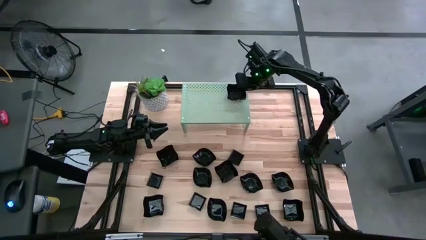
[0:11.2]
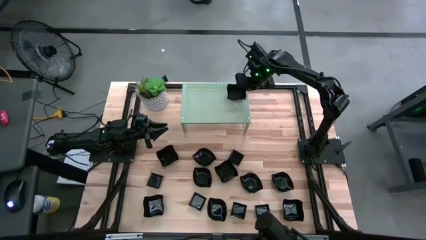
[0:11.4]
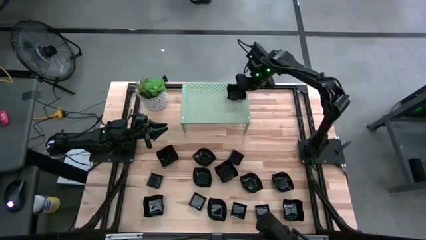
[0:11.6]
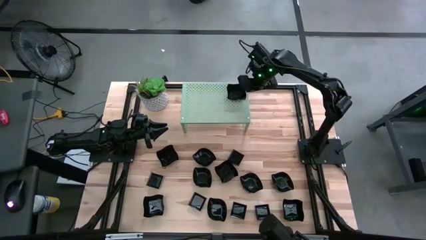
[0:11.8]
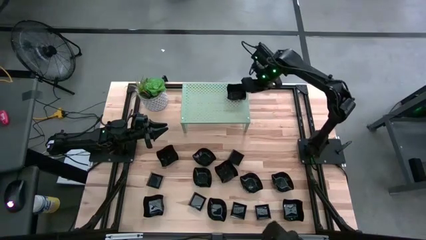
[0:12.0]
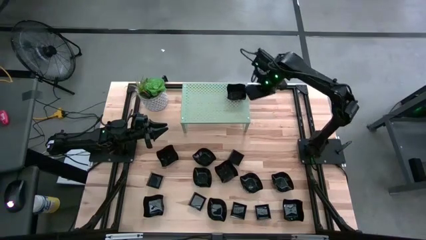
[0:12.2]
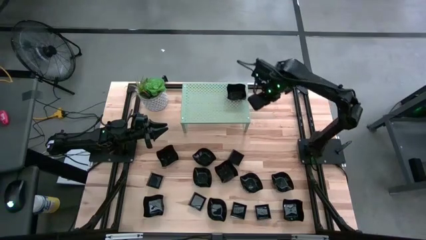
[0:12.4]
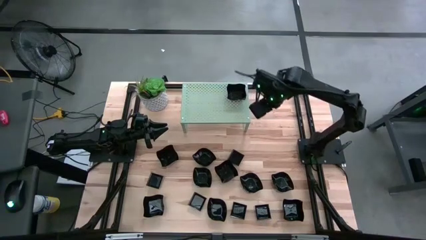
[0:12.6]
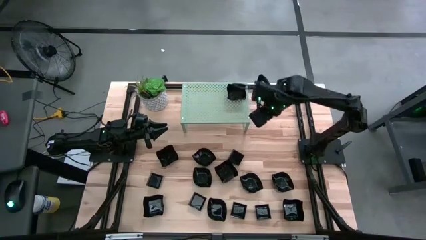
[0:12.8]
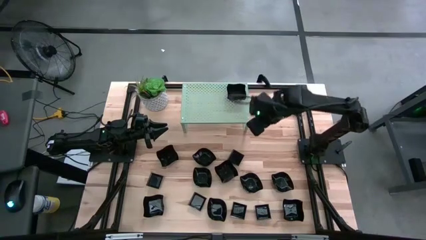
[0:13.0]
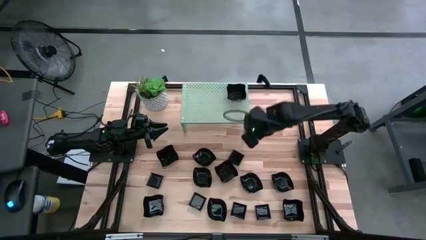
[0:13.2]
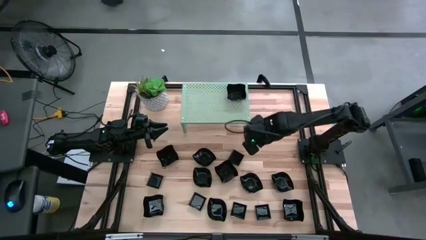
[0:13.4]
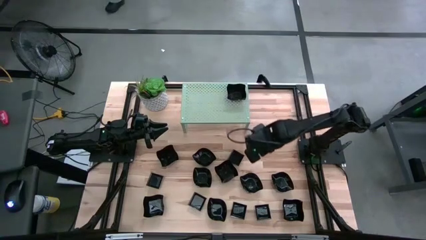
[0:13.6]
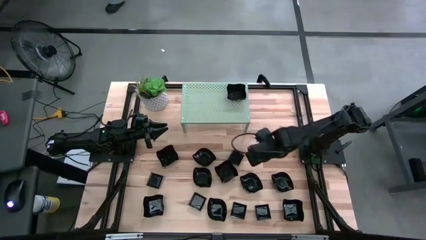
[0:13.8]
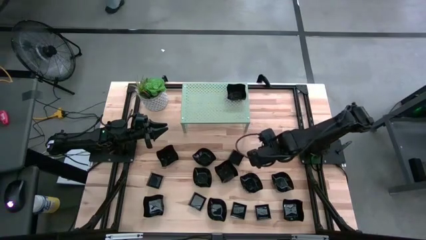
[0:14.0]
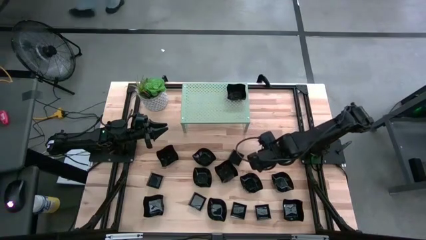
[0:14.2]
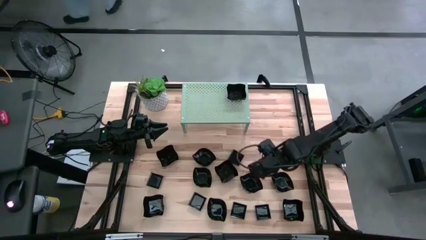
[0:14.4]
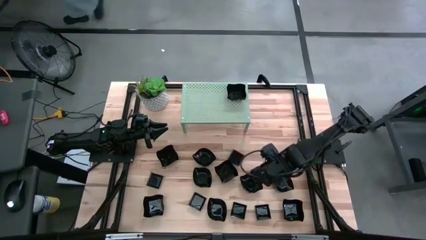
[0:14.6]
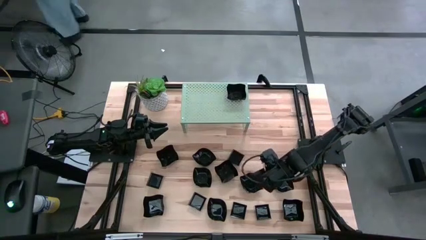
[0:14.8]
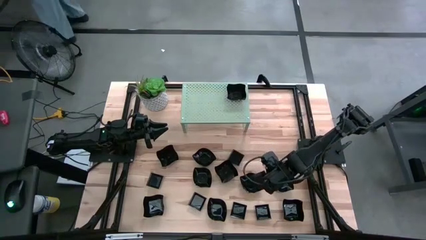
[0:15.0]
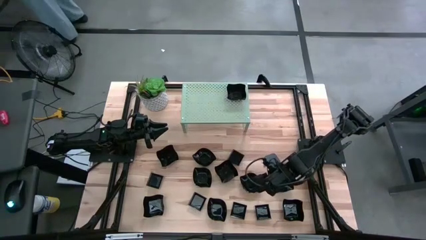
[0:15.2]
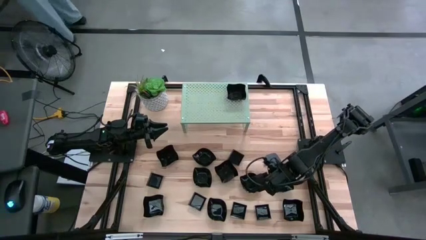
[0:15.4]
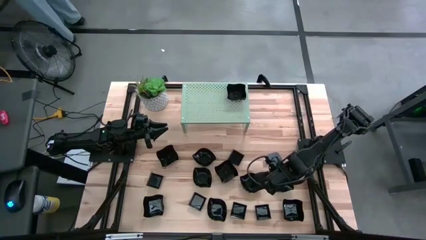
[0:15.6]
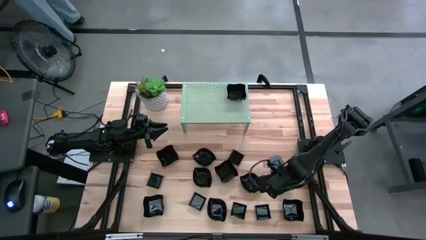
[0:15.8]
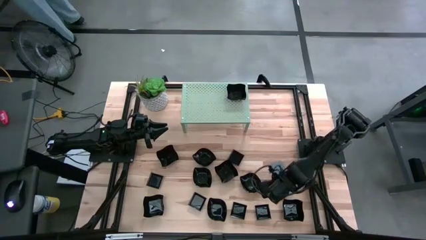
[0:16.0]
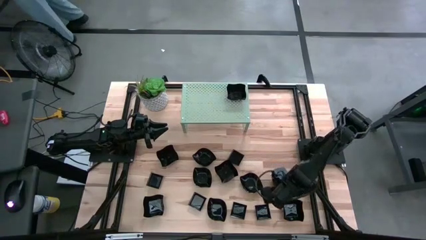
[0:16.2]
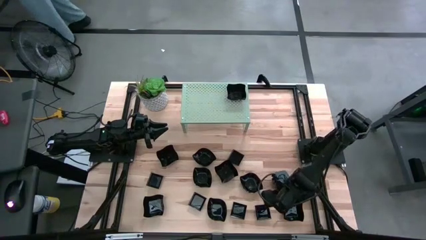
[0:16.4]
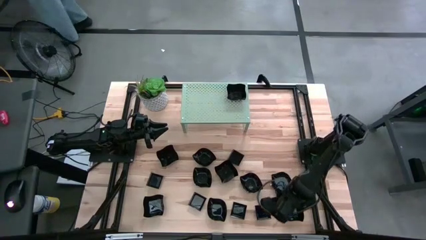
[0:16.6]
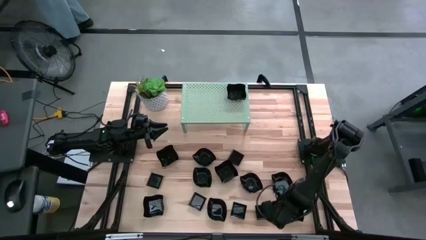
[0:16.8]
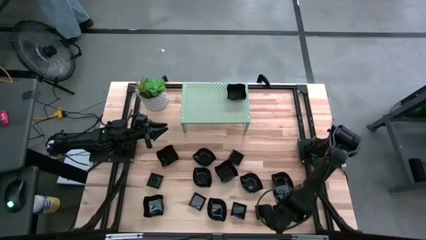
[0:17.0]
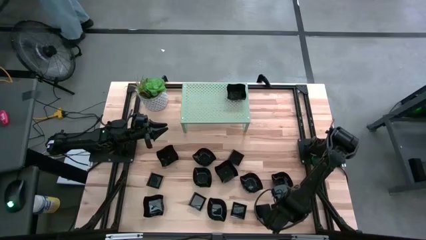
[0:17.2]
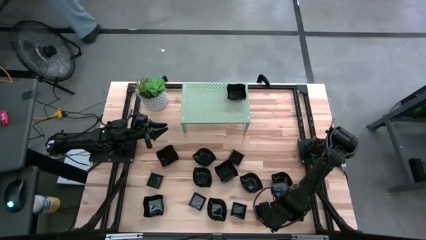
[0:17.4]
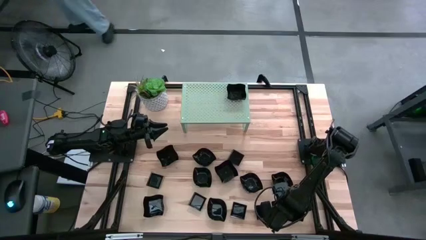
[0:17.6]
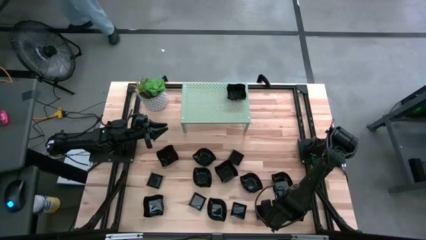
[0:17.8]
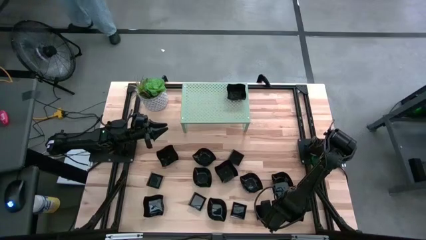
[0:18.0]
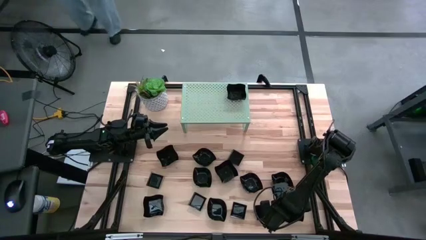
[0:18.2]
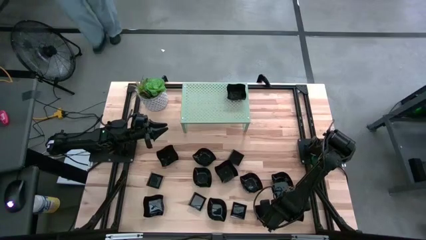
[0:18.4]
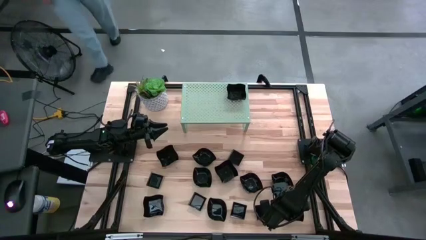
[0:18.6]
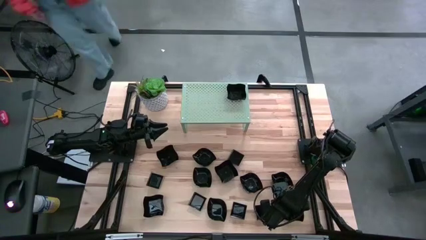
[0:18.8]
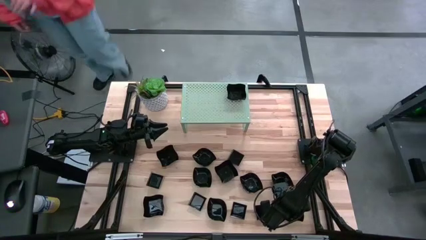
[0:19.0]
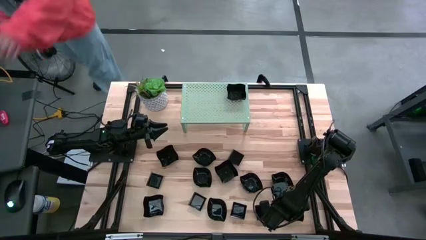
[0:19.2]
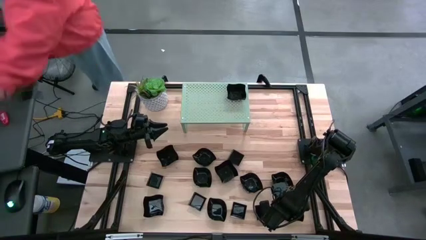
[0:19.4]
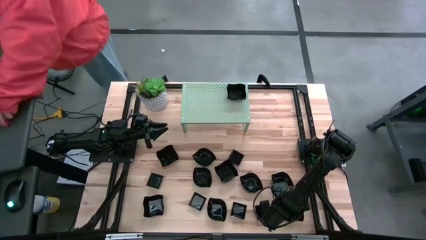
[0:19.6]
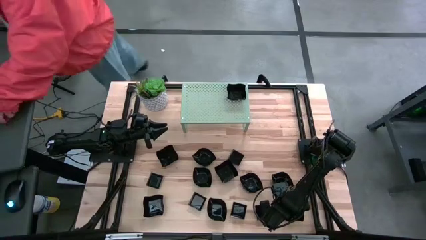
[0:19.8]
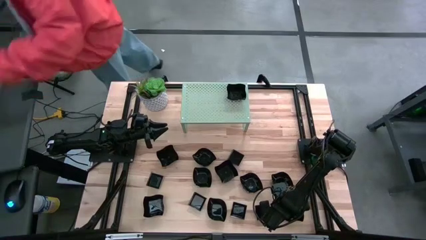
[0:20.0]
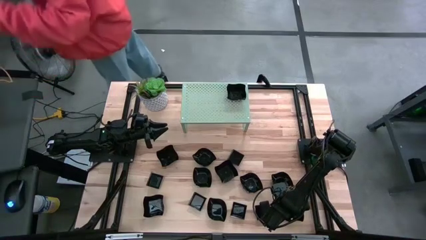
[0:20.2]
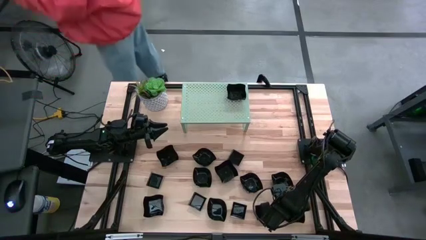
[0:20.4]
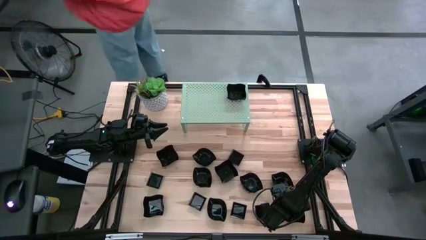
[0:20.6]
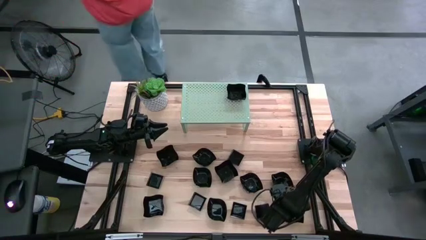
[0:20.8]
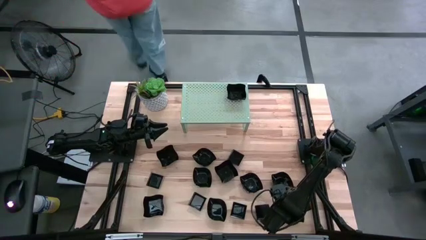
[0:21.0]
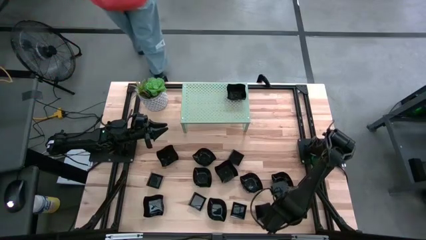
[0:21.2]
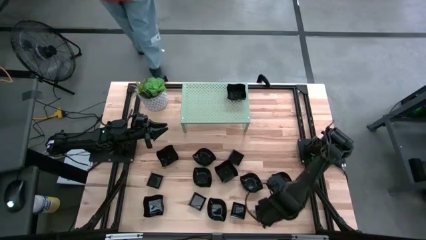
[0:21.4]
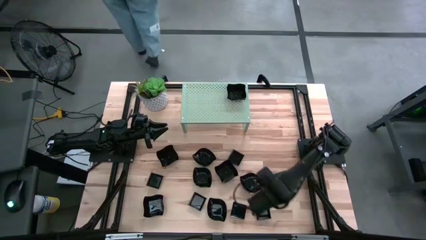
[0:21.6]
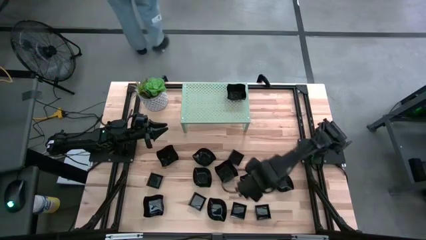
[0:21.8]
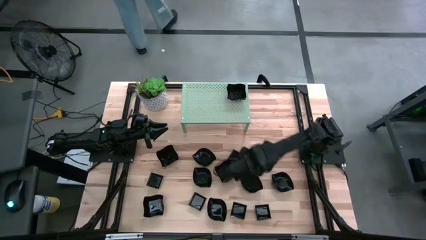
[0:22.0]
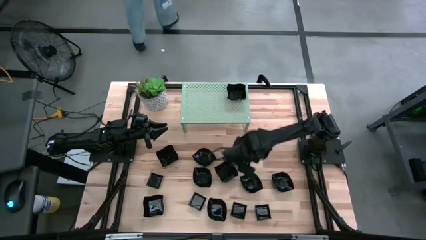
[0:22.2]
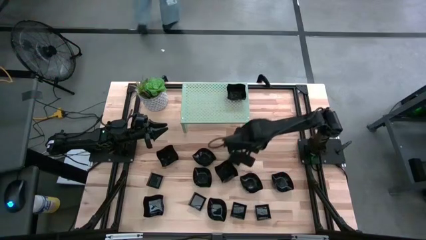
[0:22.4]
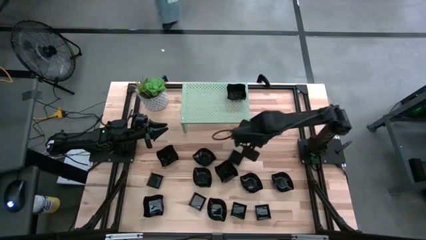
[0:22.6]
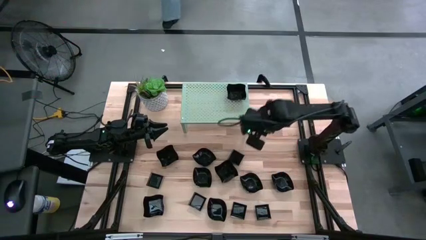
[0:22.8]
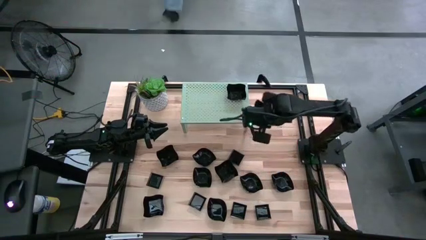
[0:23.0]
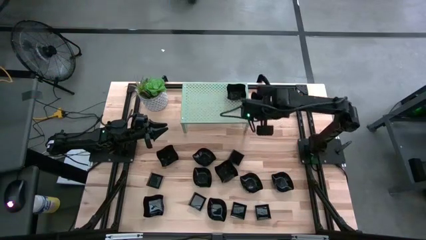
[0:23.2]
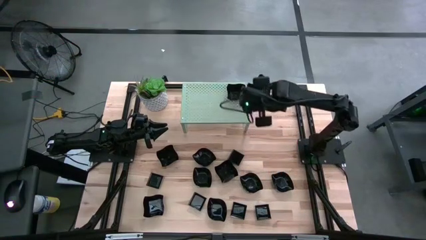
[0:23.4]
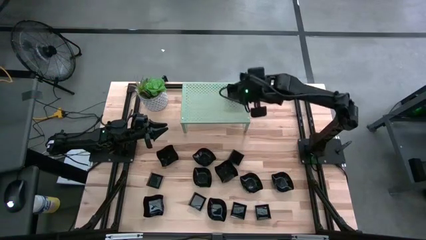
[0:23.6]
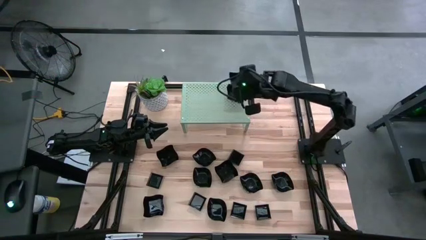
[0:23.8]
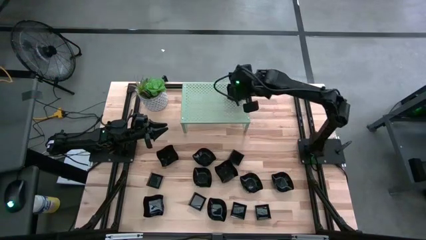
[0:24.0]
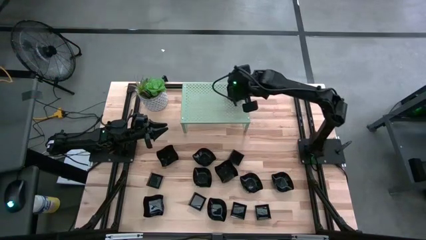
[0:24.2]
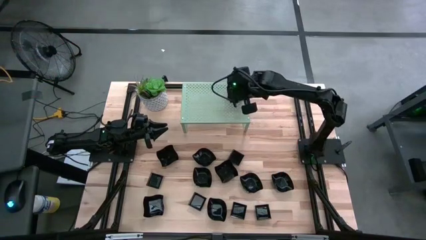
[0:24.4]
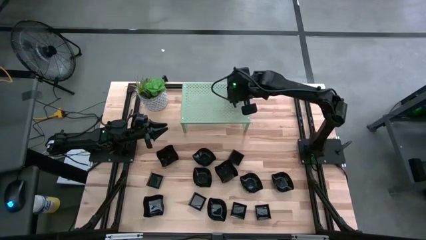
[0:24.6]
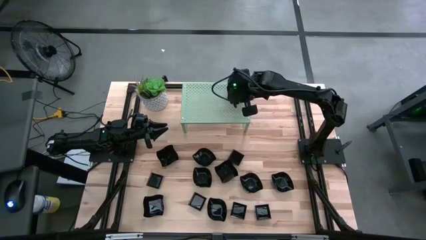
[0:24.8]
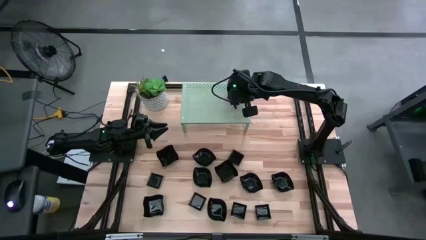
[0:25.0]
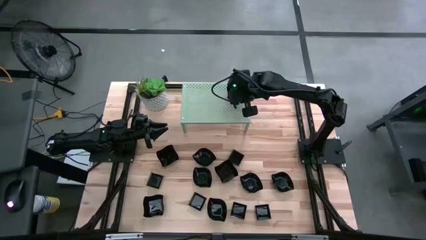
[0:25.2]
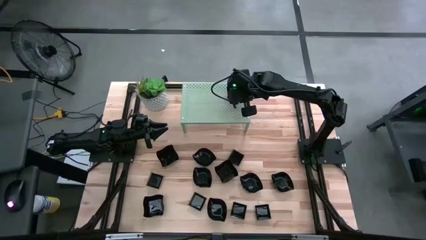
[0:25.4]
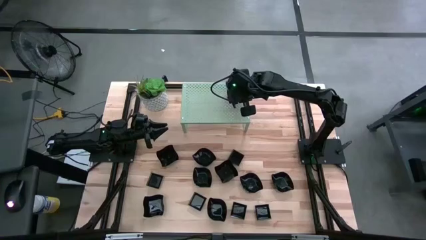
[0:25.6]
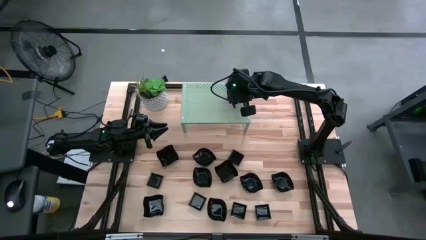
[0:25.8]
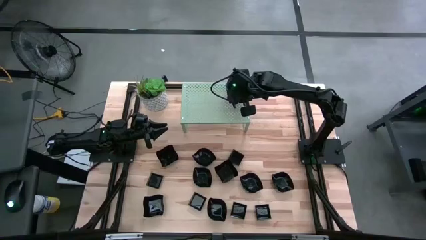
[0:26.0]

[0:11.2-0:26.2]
Task: Pick & Place Mini shaped plates
Stack the distorted square plate on top of the distorted square plate on the shelf
